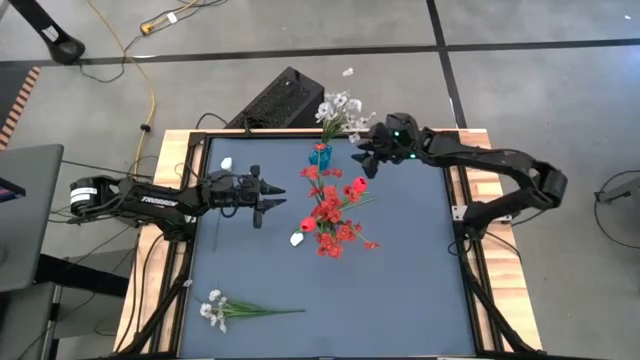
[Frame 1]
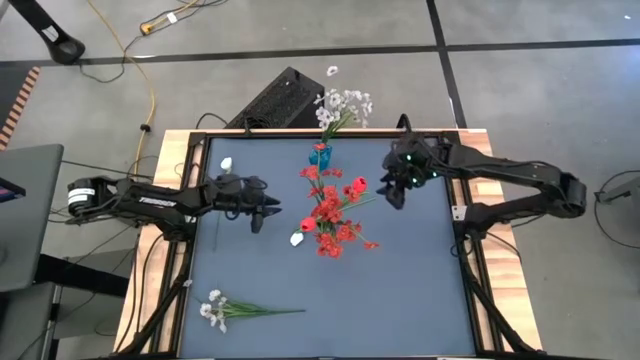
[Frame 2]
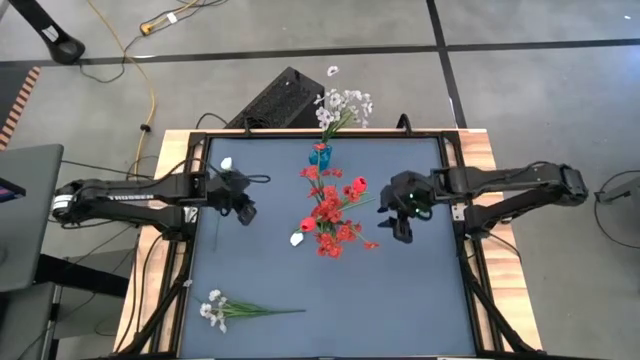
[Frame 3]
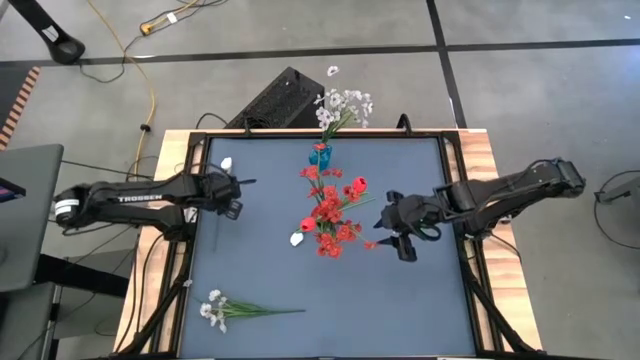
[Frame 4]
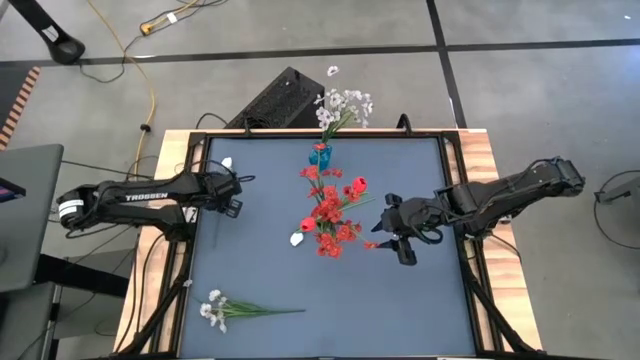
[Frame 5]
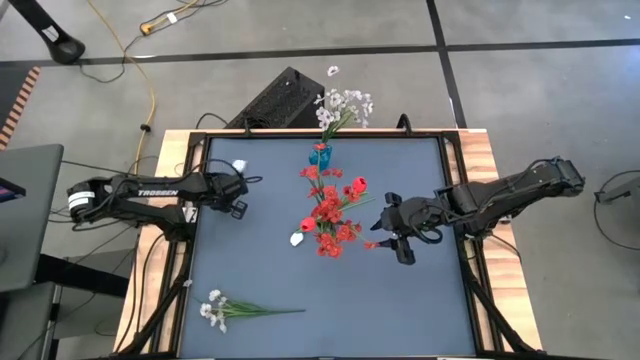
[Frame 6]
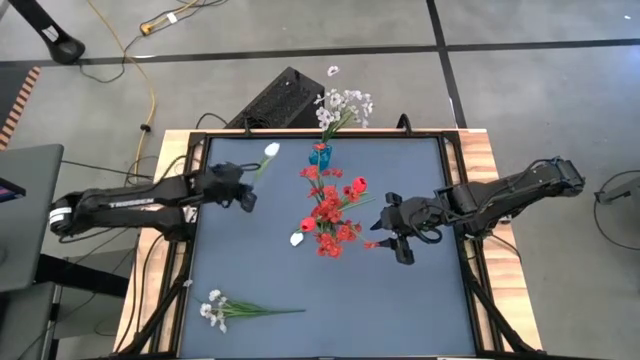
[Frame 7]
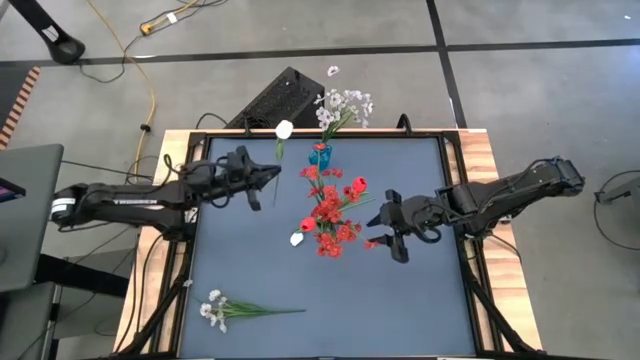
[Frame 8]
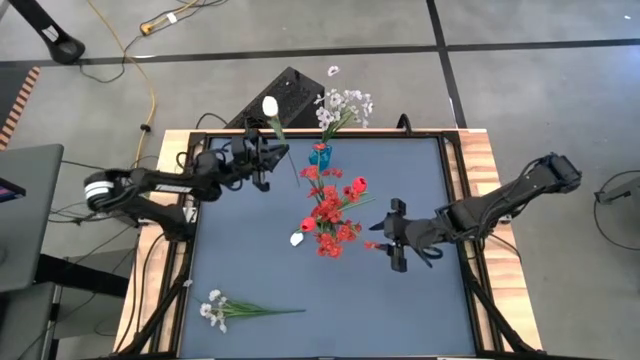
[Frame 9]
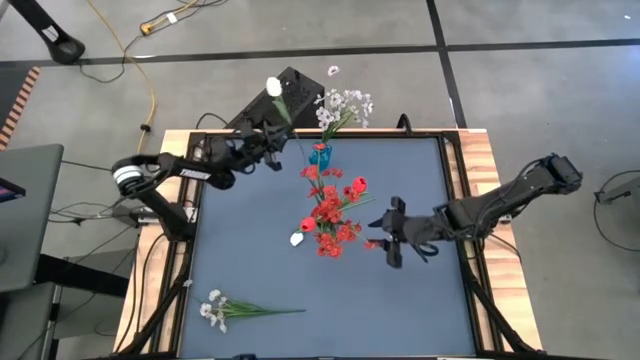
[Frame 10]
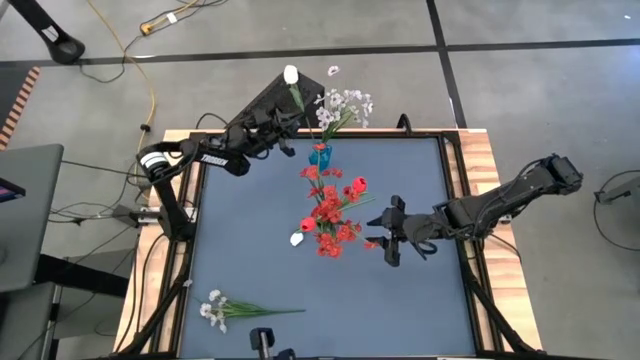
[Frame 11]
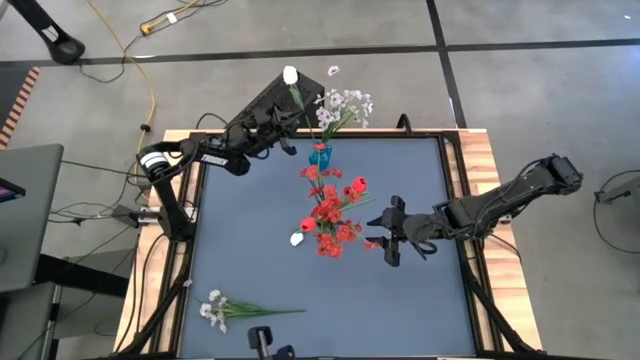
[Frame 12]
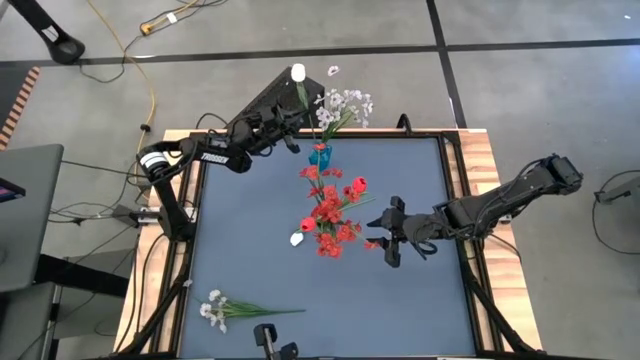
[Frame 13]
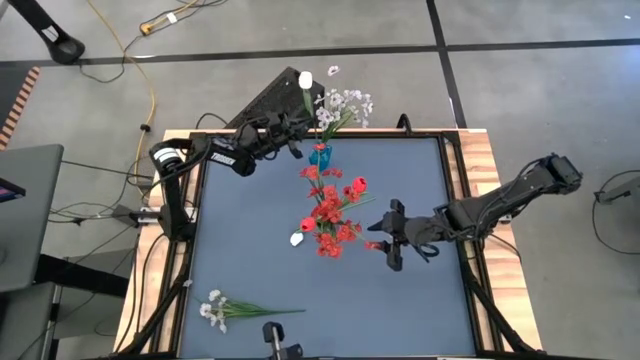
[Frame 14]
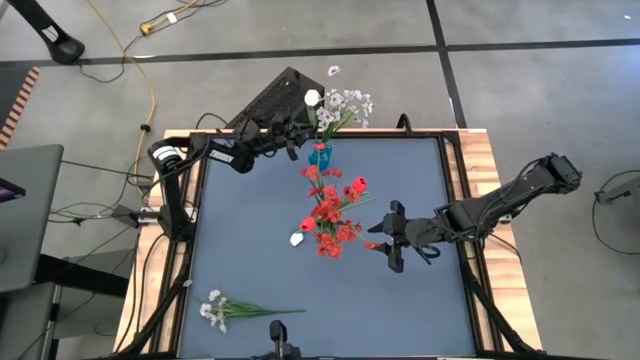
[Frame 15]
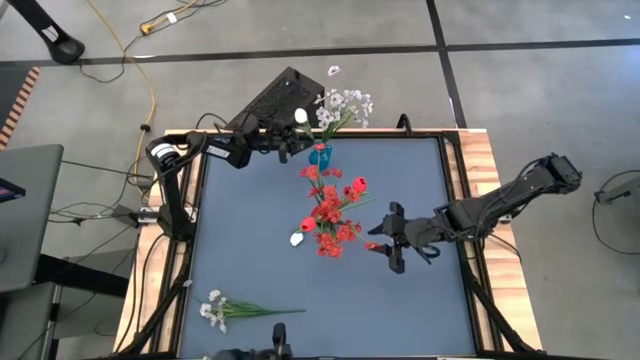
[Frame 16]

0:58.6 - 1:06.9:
Task: Sort flowers into vase by color
Put the left white tulip into the blue vase

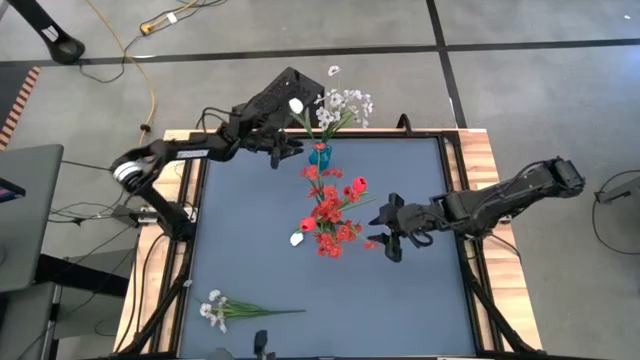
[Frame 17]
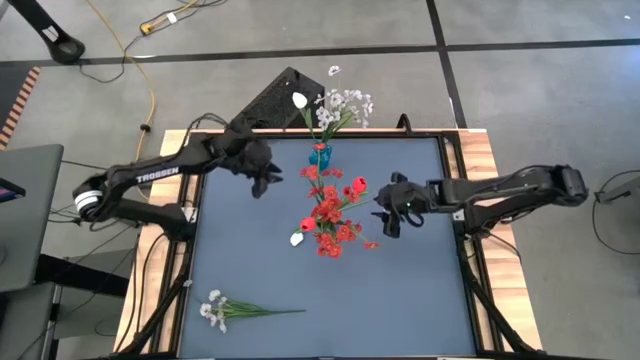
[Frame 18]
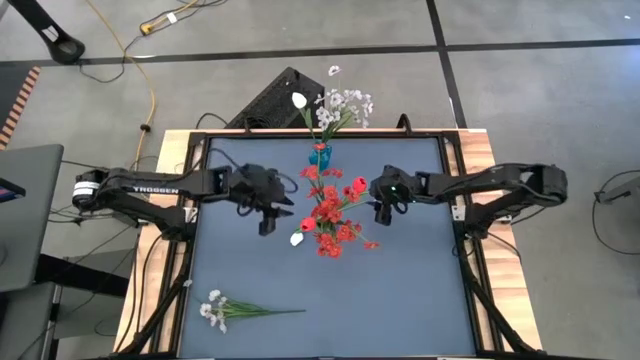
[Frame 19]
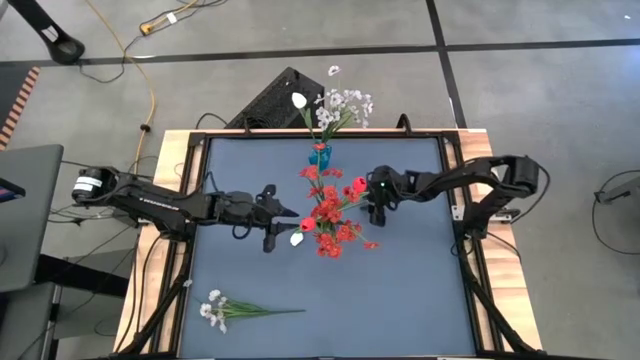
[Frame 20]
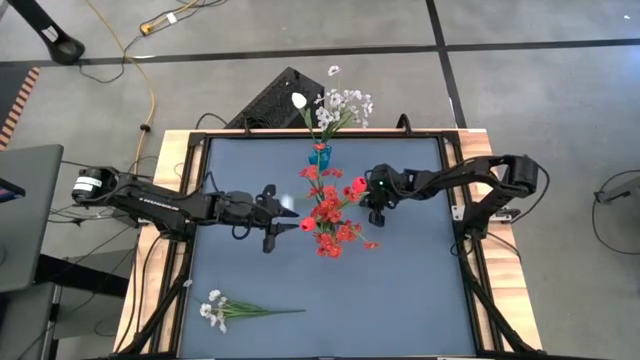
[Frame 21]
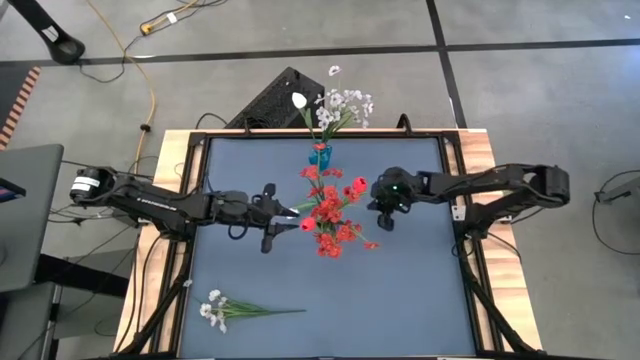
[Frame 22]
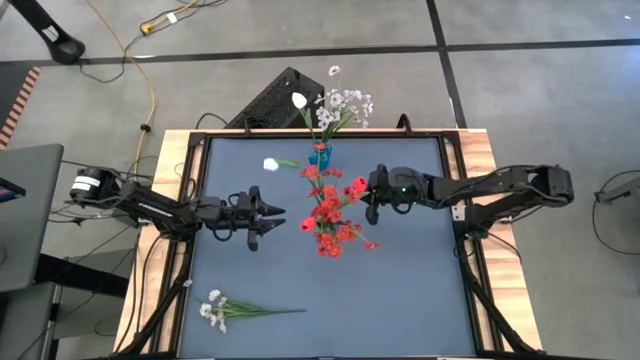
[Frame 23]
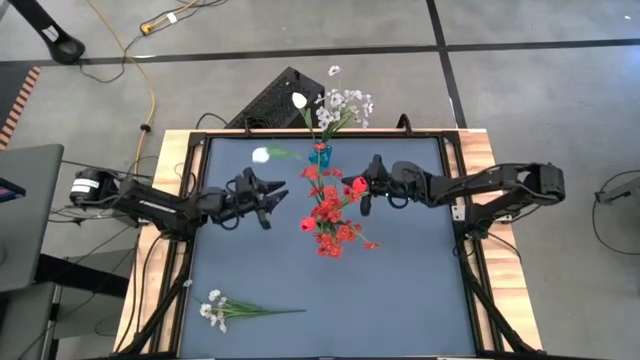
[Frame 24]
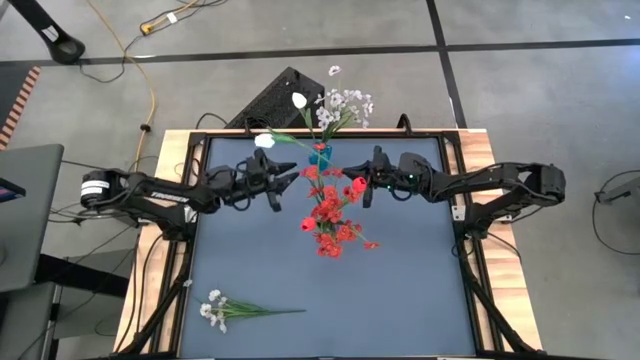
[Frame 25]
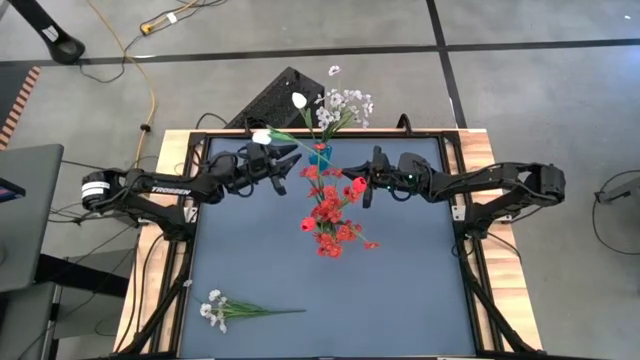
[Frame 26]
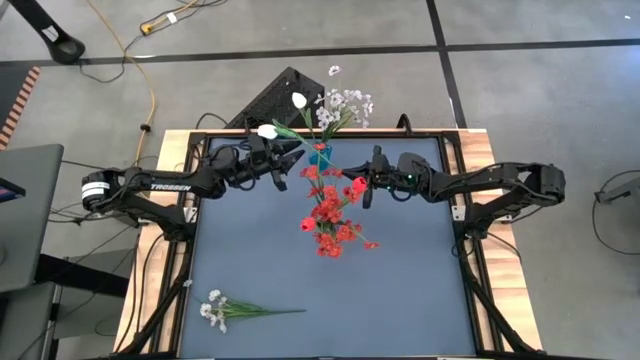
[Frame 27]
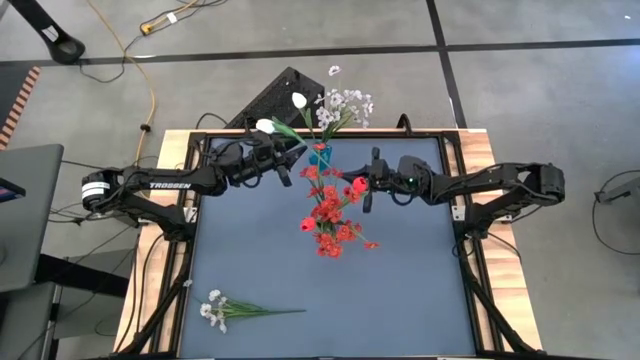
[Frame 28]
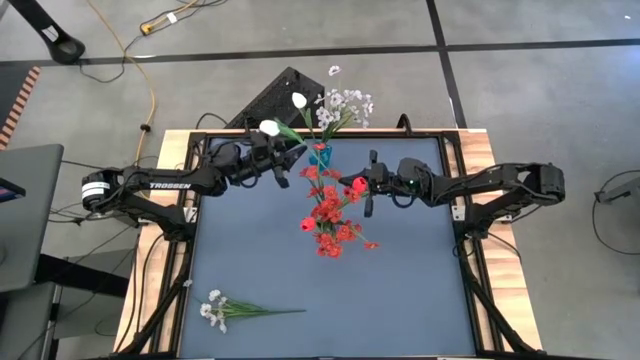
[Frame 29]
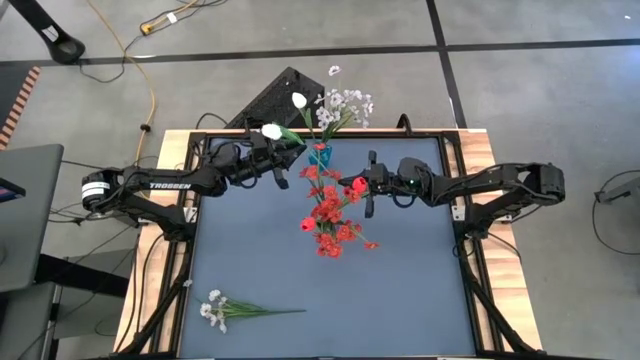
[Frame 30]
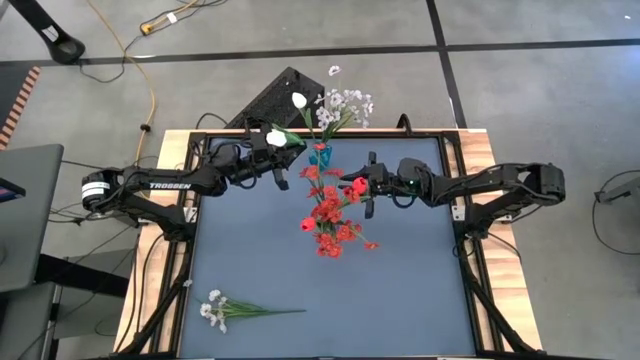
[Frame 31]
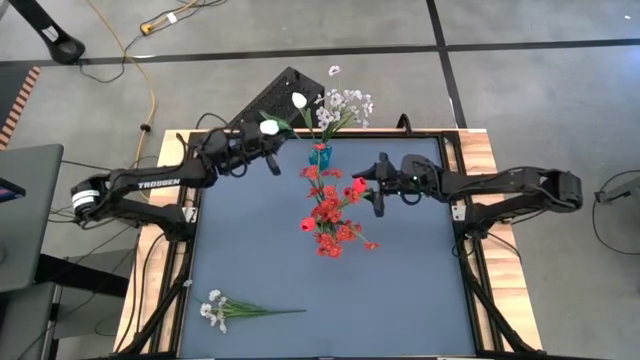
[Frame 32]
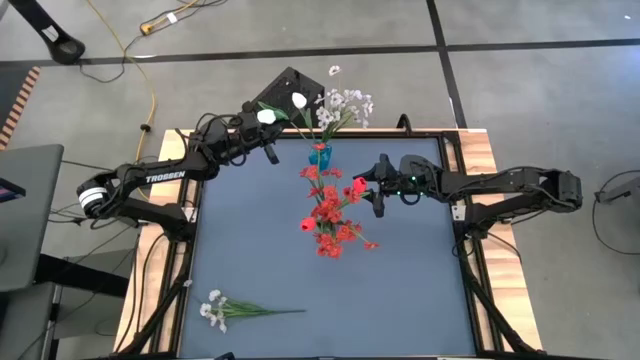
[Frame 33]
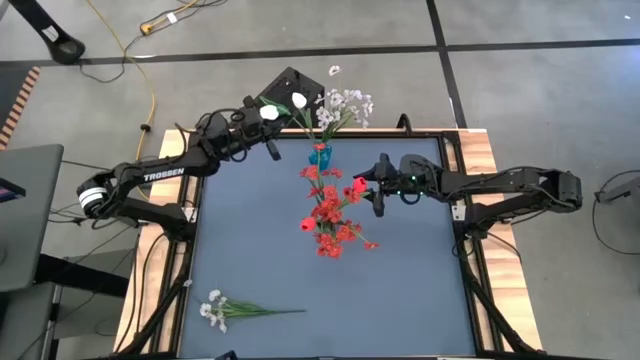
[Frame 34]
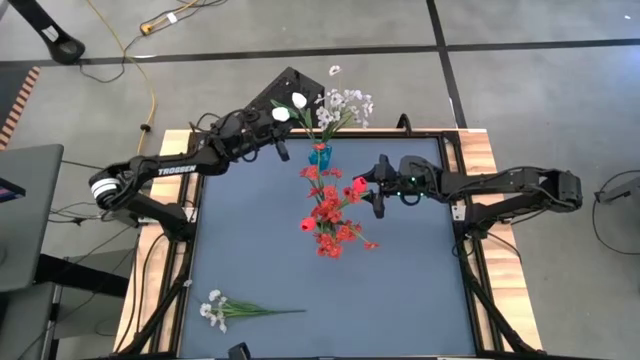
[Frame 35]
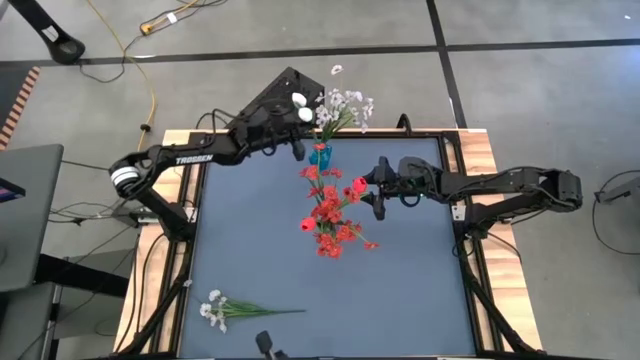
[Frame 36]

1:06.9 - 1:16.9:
Put the white tulip into the blue vase

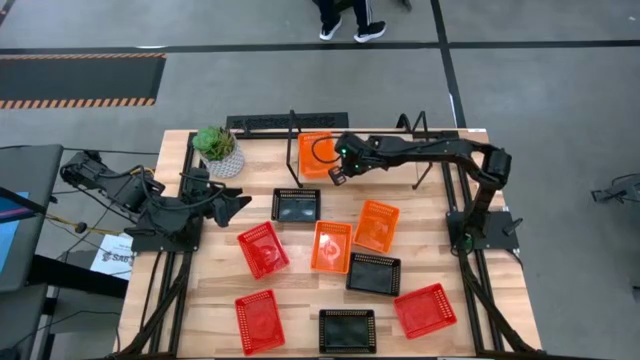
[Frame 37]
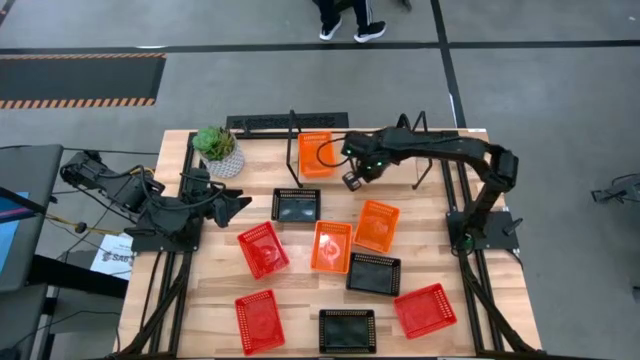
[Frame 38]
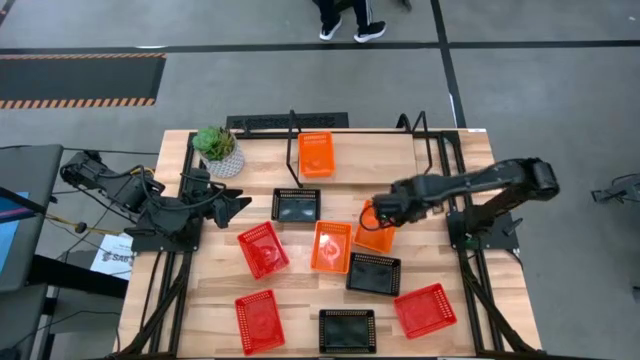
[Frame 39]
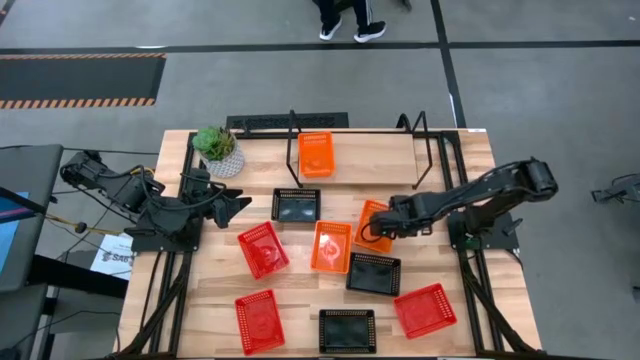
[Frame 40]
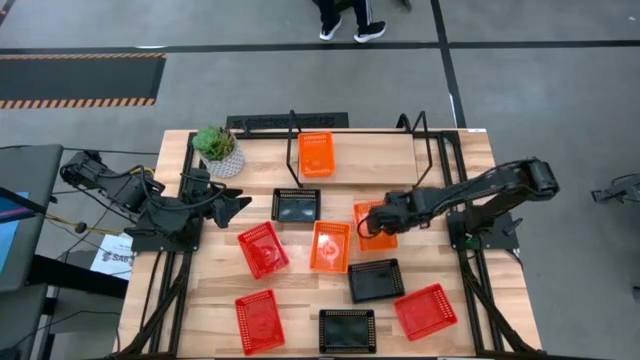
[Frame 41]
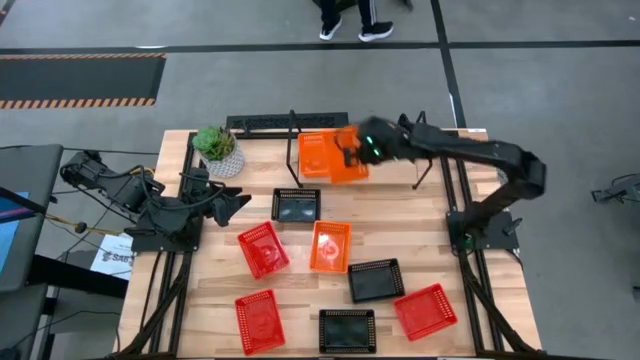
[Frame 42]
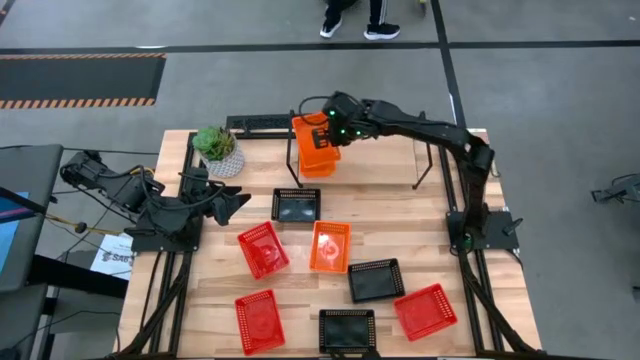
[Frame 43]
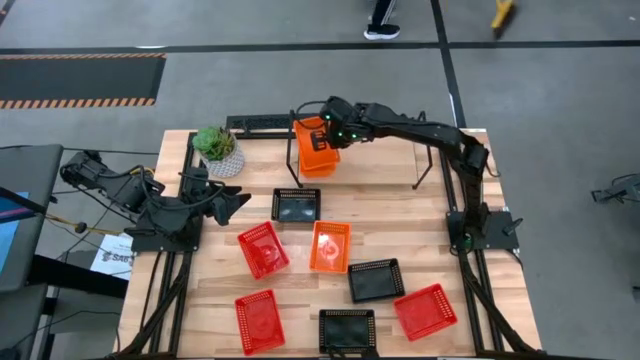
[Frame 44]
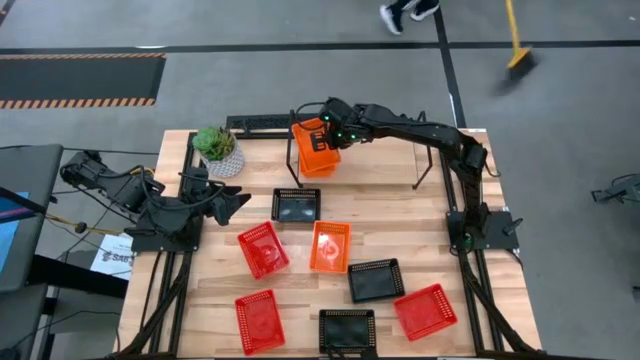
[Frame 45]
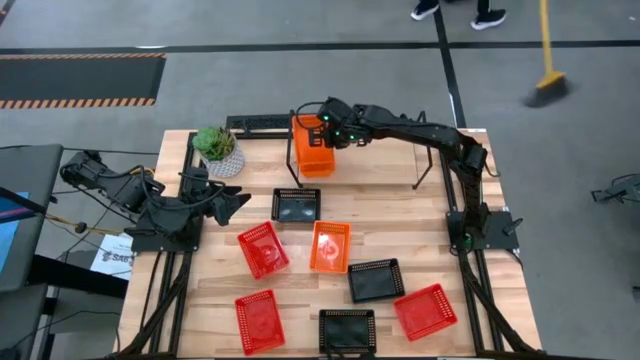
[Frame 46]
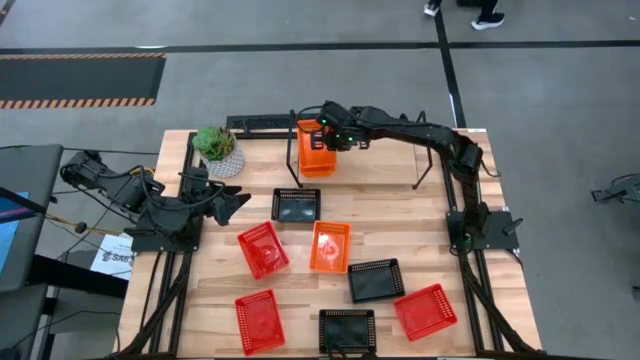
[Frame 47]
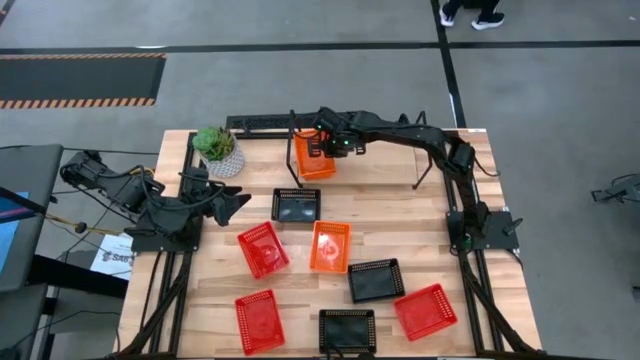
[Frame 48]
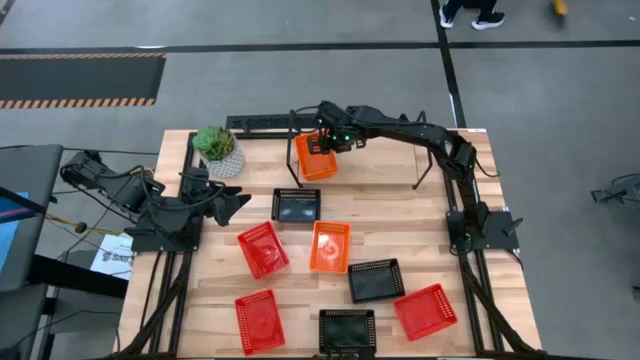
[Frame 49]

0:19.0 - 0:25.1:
Task: Stack baskets on shelf by color
Stack the right orange bin on top of the other orange bin on the shelf
